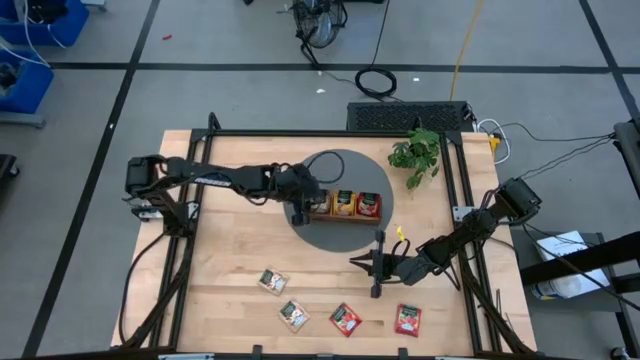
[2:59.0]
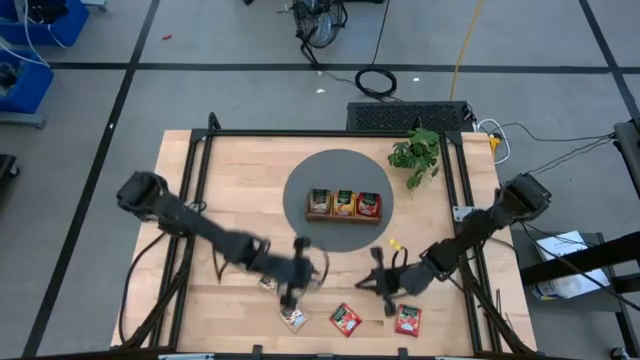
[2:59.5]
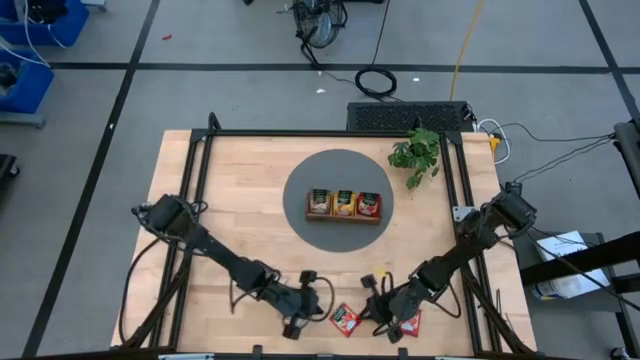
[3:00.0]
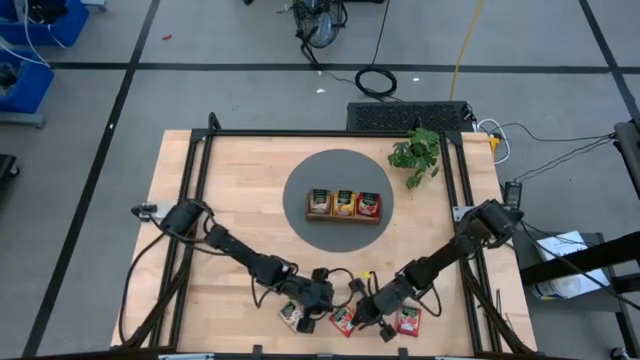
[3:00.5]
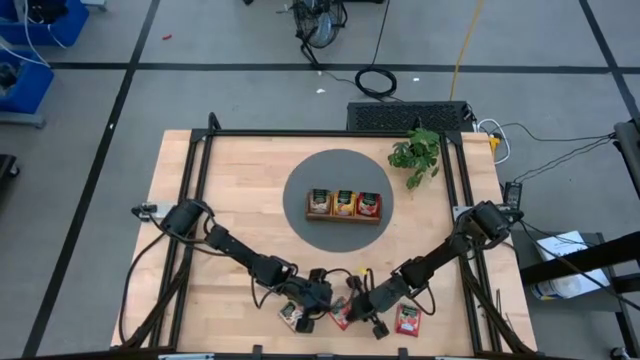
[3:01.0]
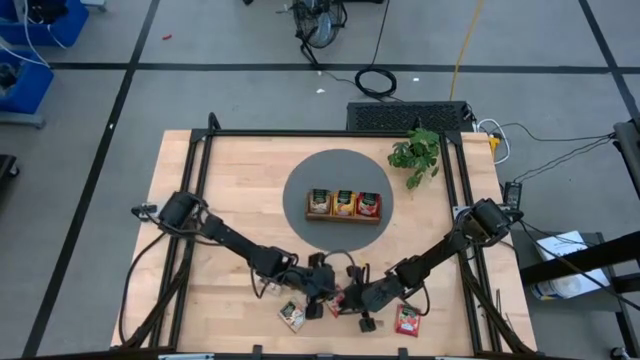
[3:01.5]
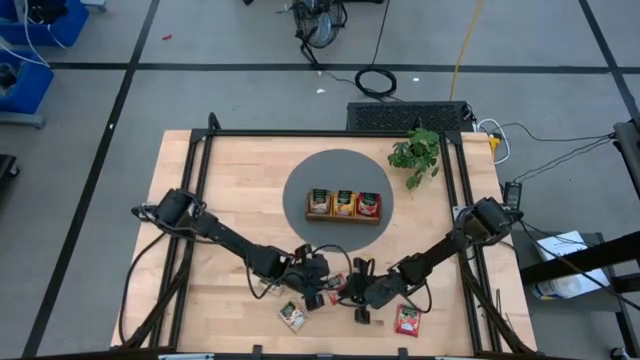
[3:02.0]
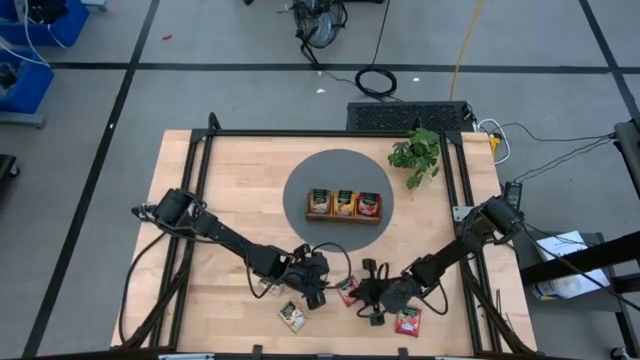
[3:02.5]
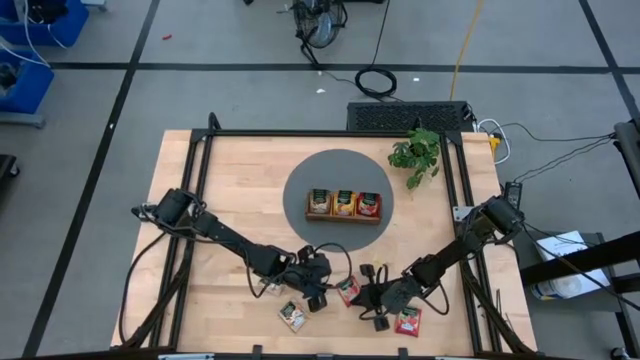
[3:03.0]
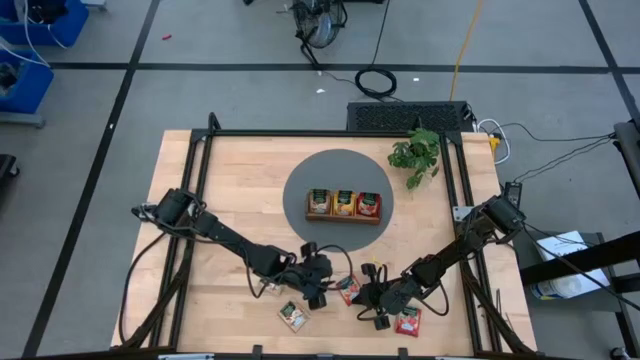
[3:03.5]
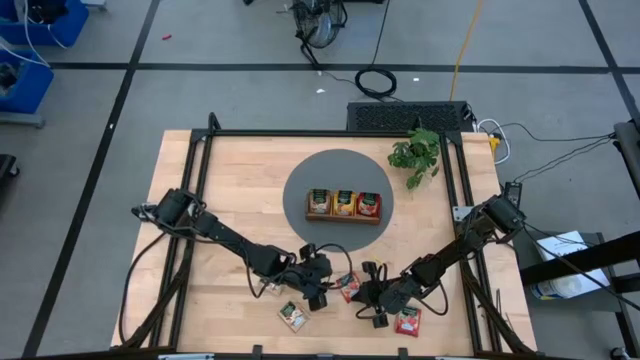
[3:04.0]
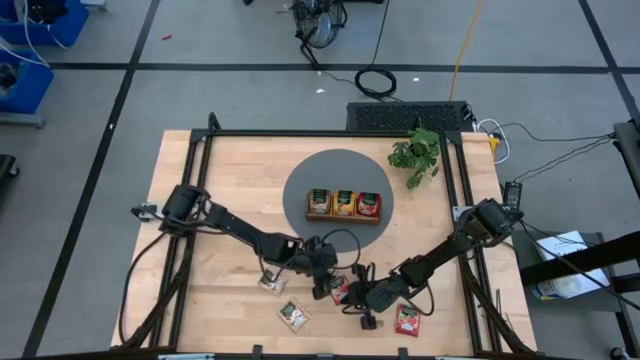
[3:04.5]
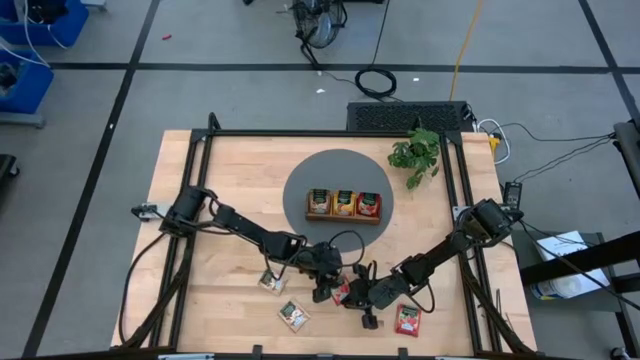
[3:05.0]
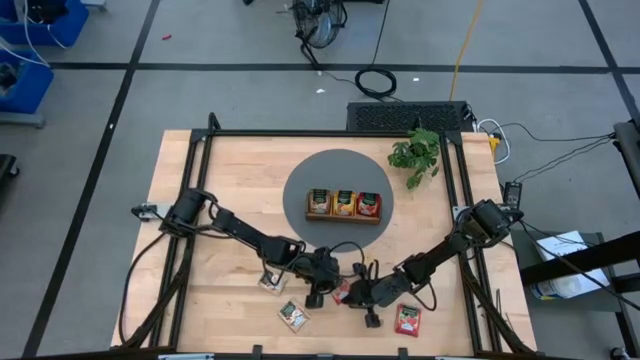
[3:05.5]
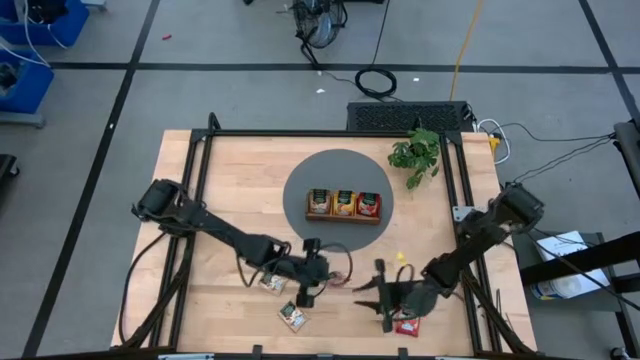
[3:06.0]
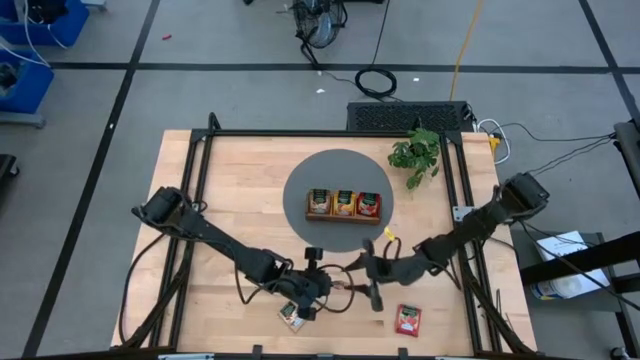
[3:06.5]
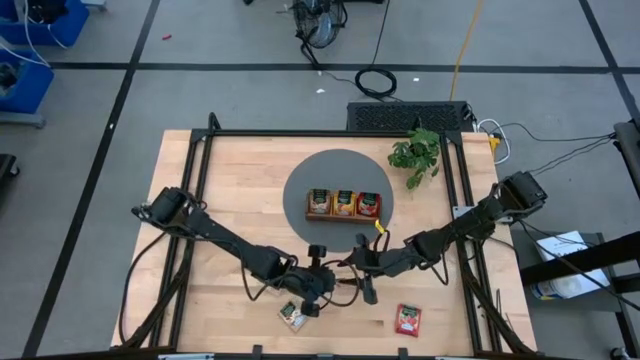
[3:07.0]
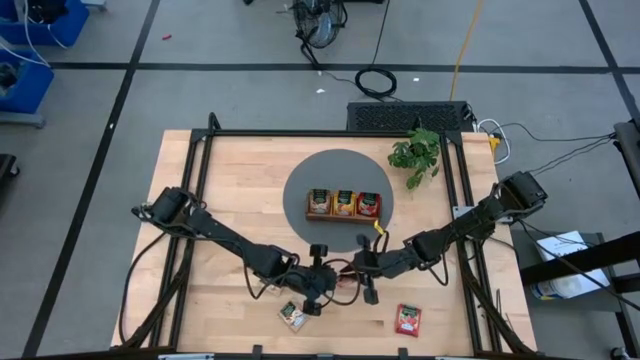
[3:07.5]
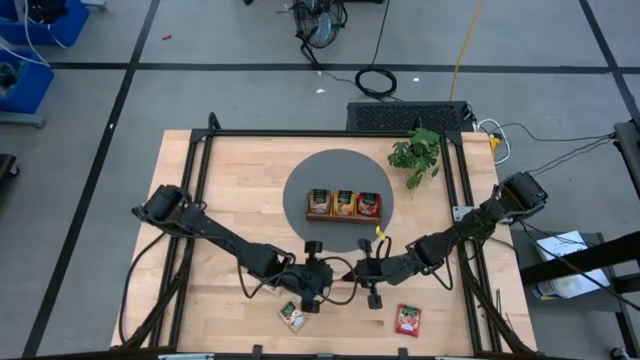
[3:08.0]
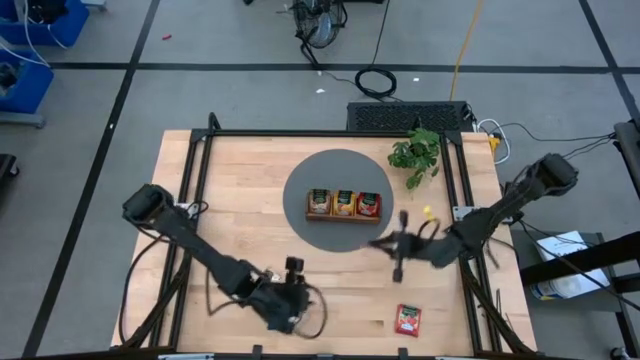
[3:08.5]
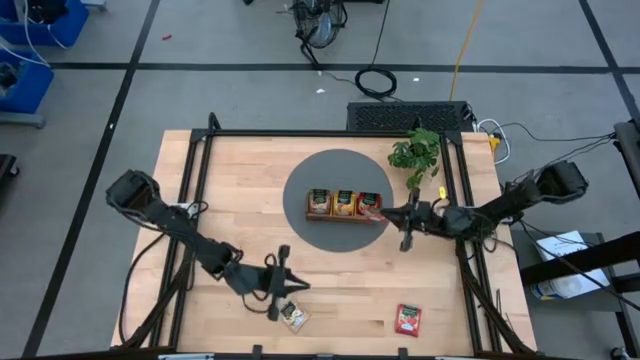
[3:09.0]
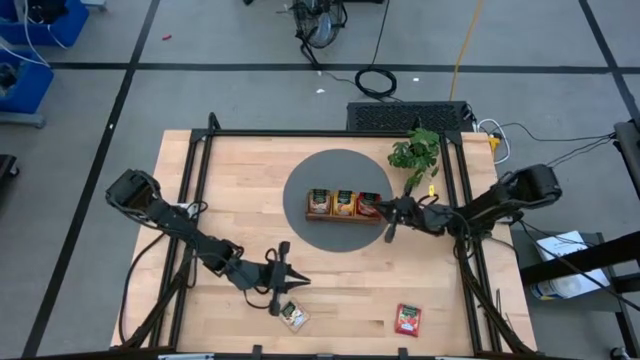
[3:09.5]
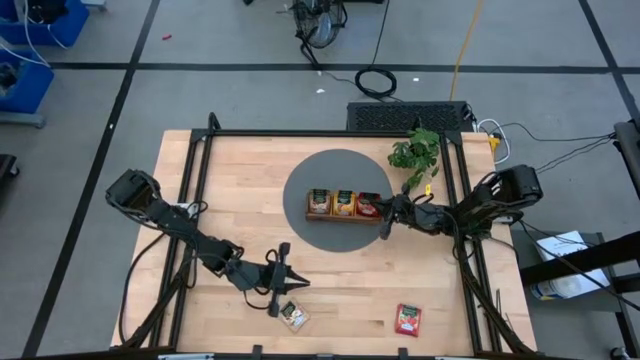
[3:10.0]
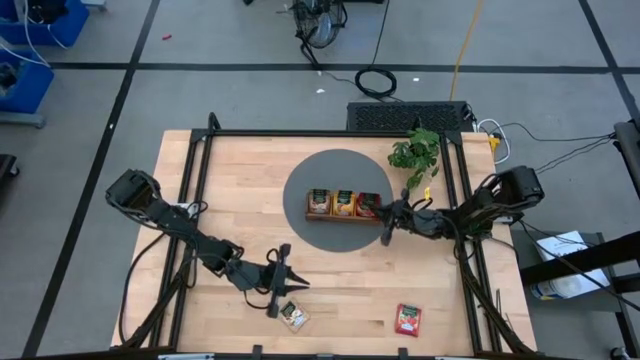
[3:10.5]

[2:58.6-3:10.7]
Task: Pick & Place Tea
Put the left red tea bag into the right slot of the wooden organizer

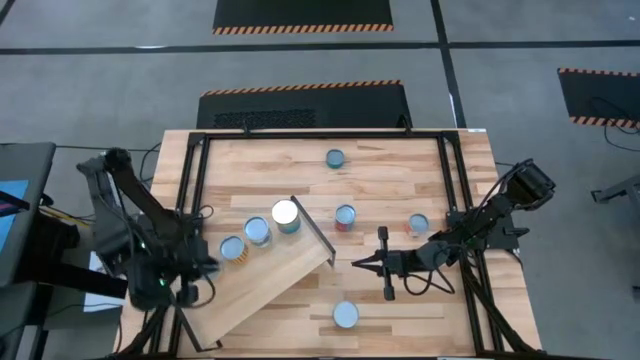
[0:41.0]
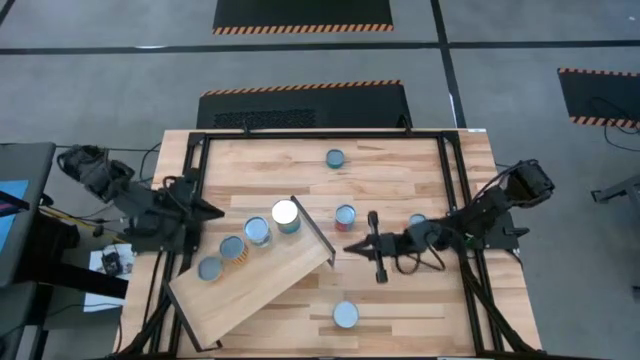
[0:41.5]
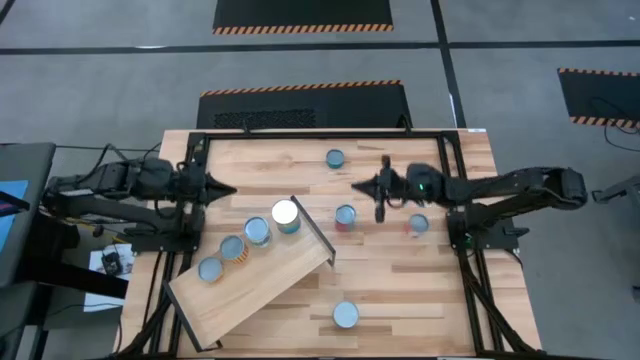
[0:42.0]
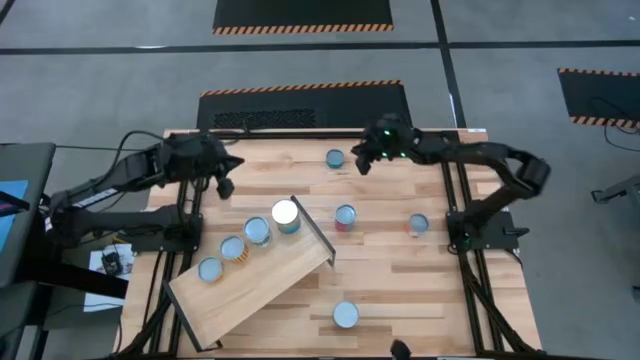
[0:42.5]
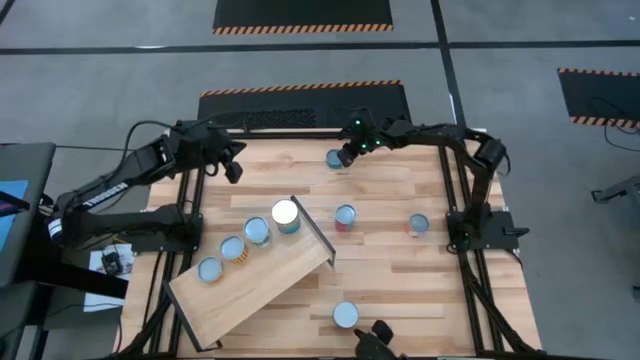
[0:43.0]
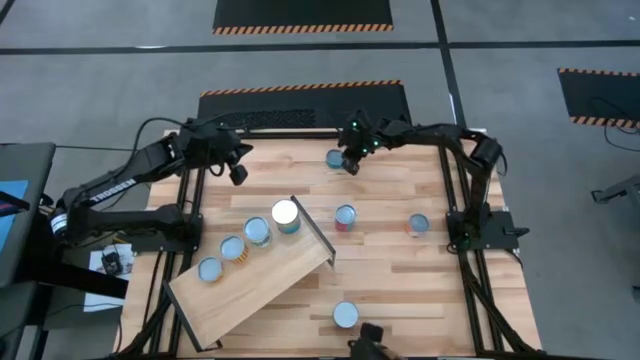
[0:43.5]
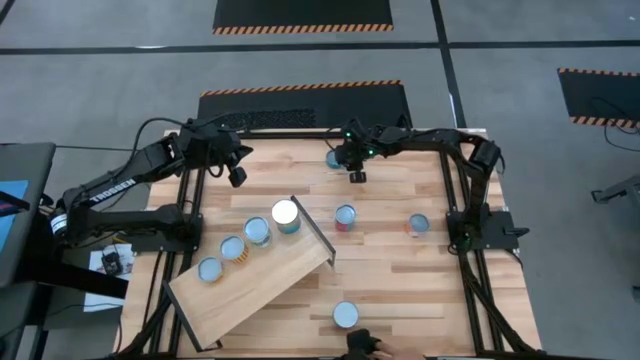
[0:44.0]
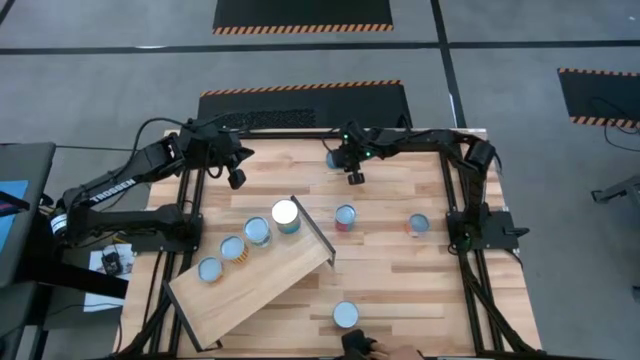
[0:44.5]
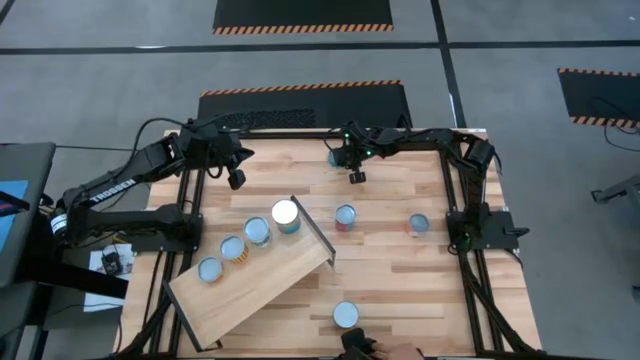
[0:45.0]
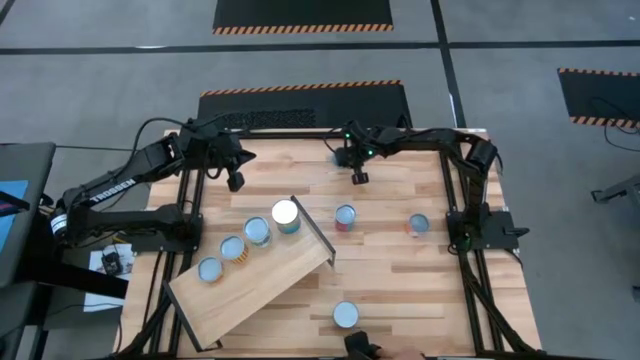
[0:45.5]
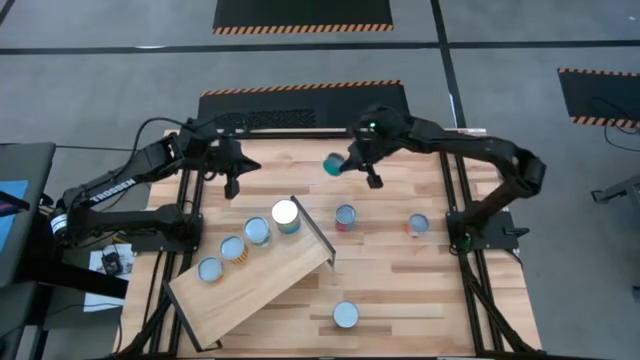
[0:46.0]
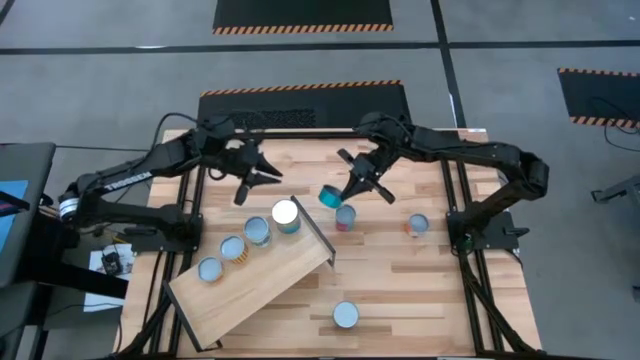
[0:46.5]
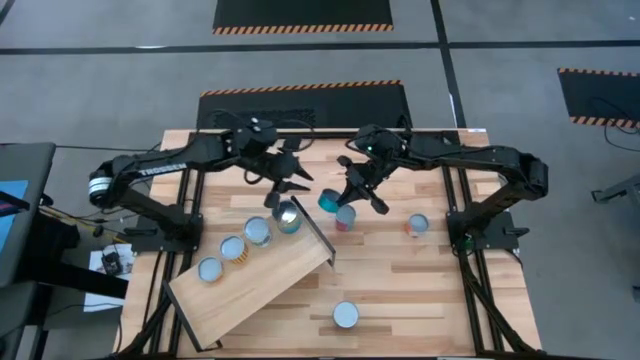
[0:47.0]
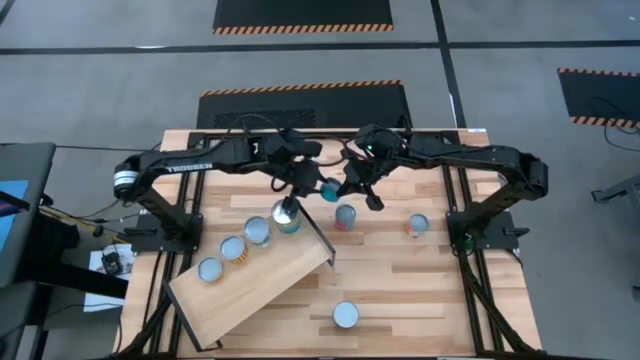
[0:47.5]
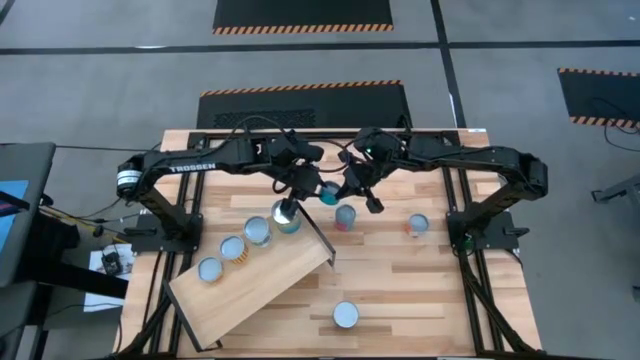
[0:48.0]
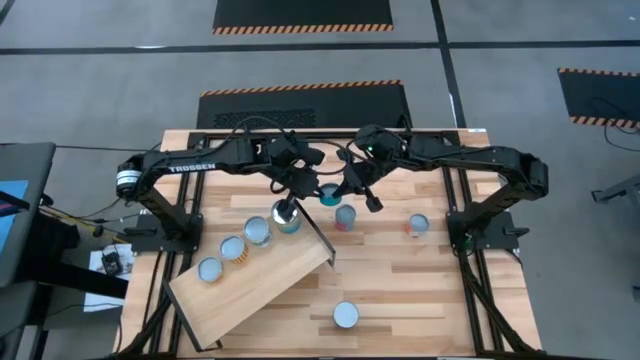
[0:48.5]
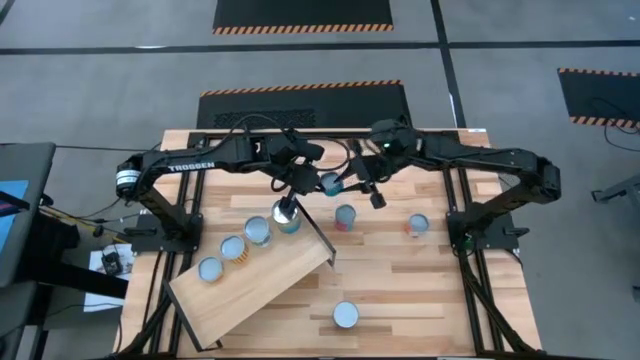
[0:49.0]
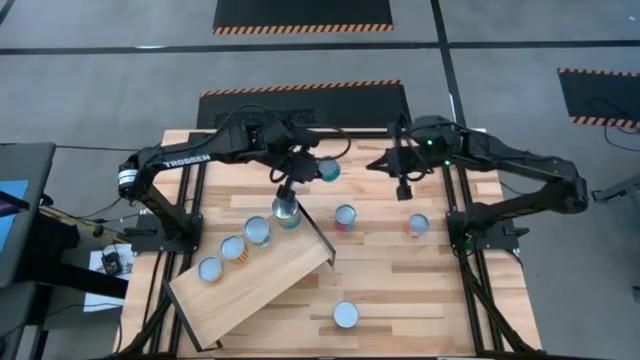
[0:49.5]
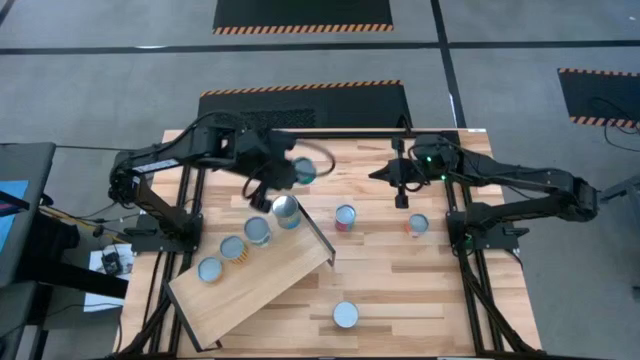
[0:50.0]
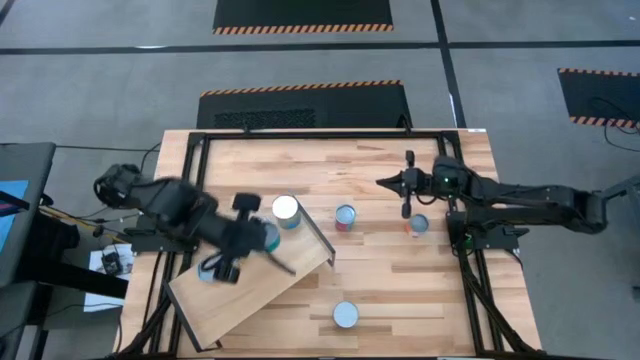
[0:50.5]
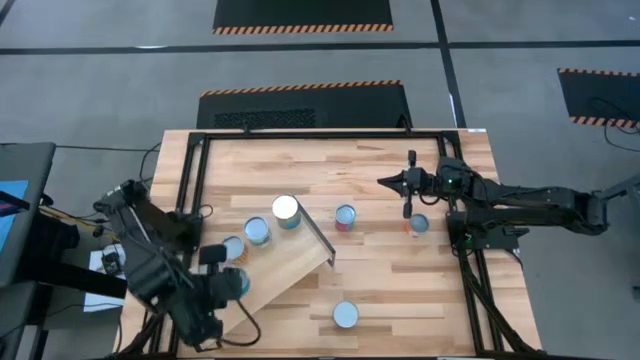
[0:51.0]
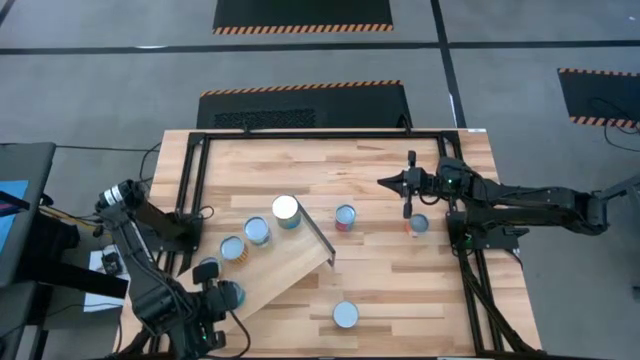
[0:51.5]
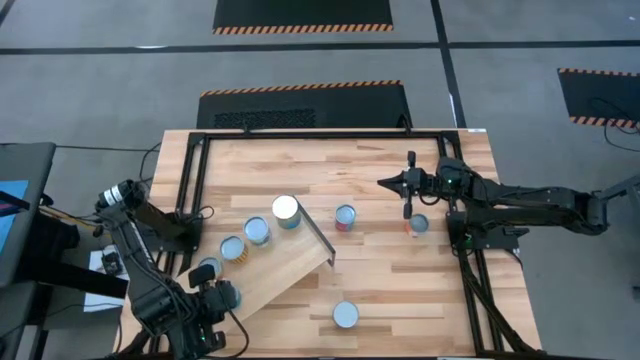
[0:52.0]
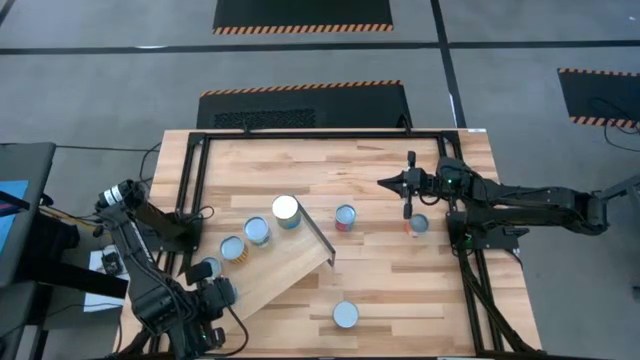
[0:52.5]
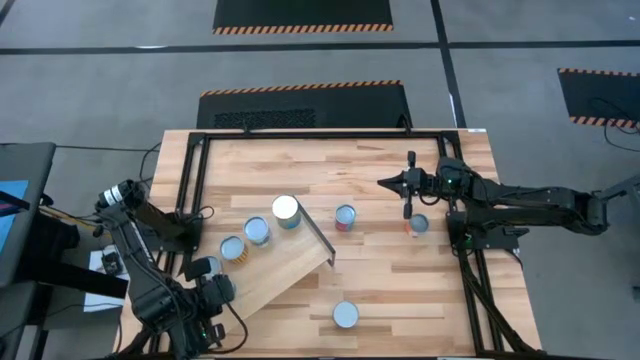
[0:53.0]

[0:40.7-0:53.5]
Task: Pick and place cans onto a shelf
Put the green tuna can on the shelf
